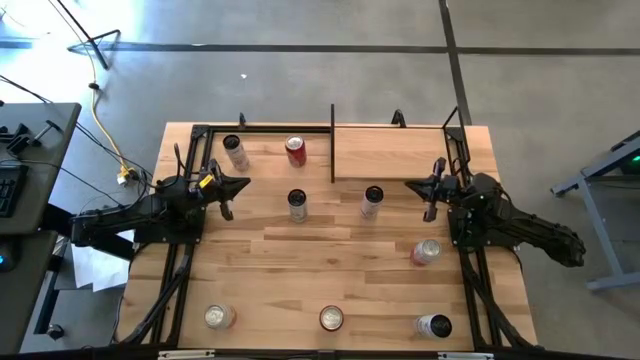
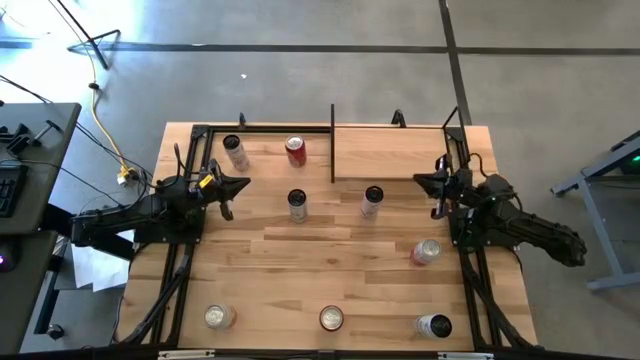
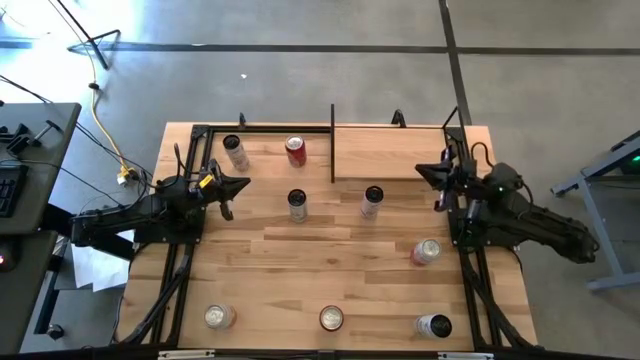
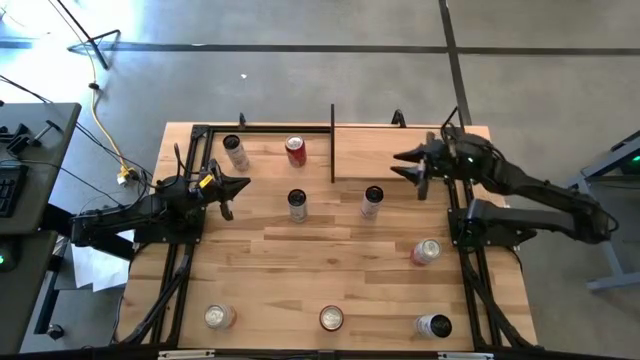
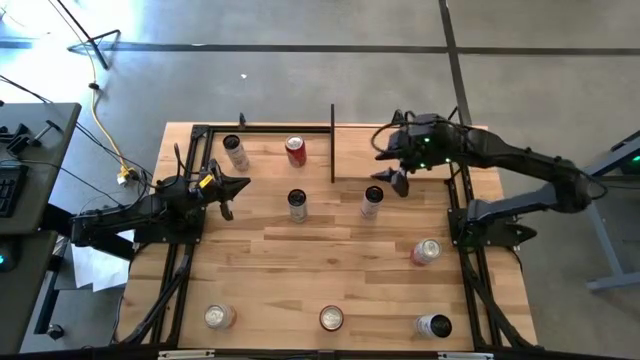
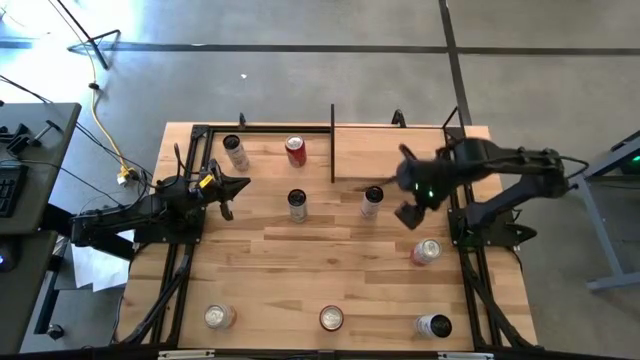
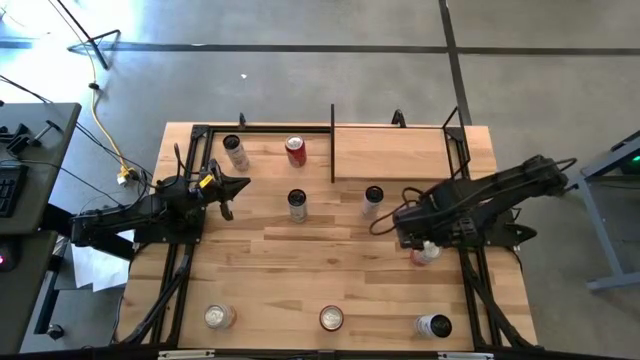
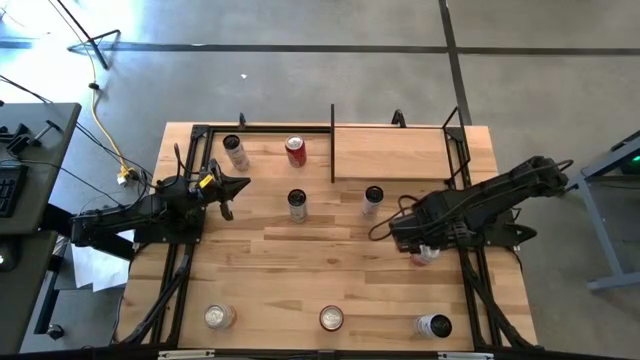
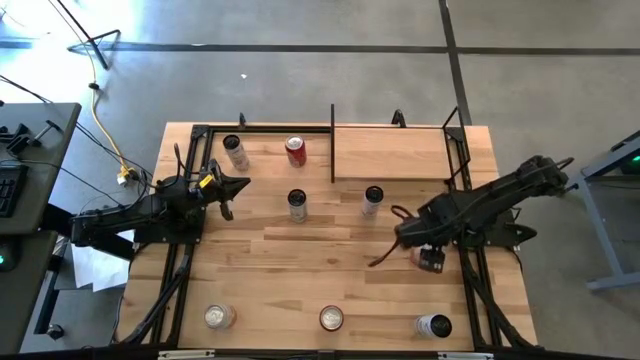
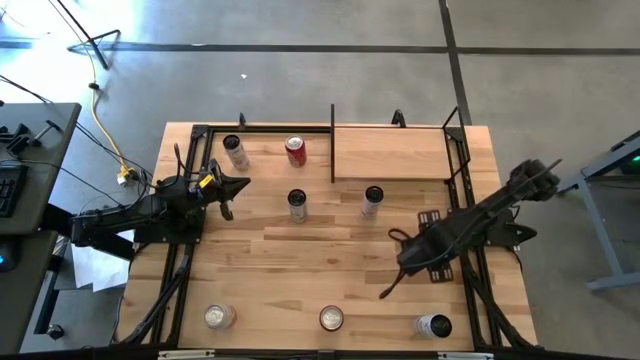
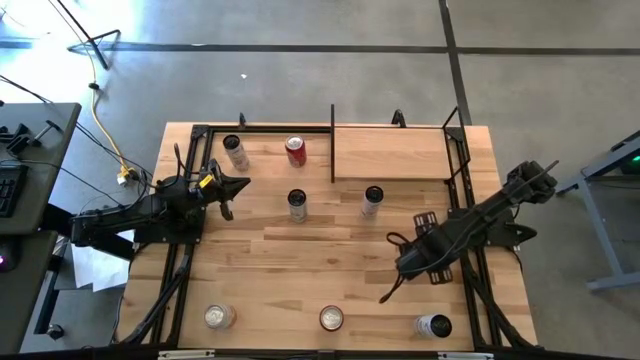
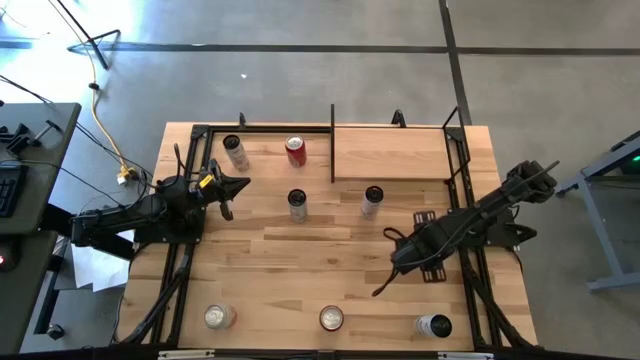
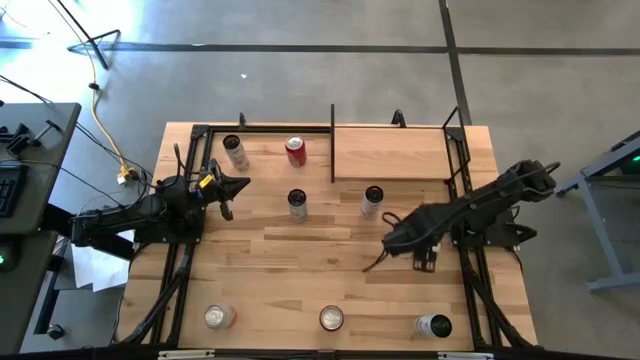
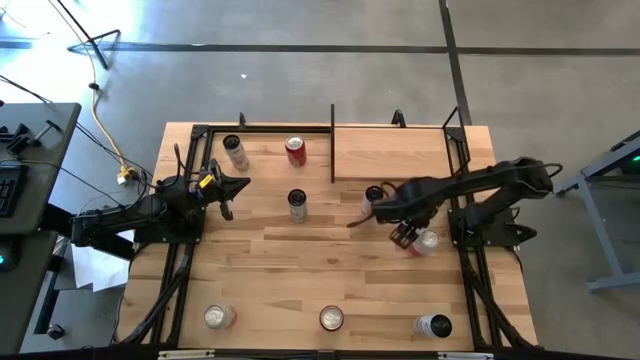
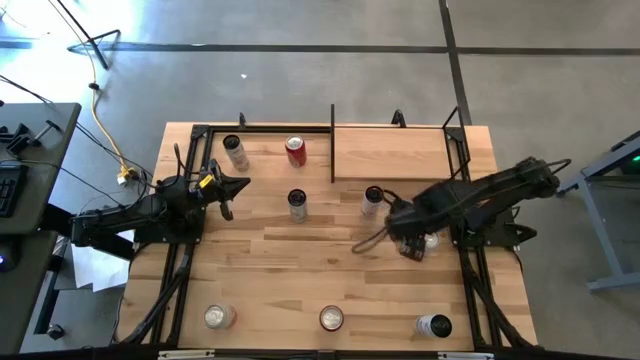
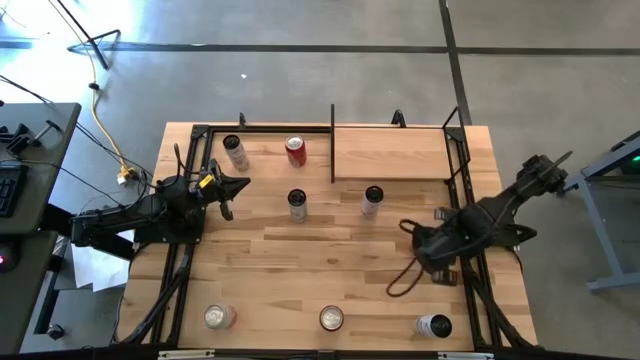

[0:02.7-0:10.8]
Task: Place canned beverage on shelf
Put the top pink soda can on the shelf

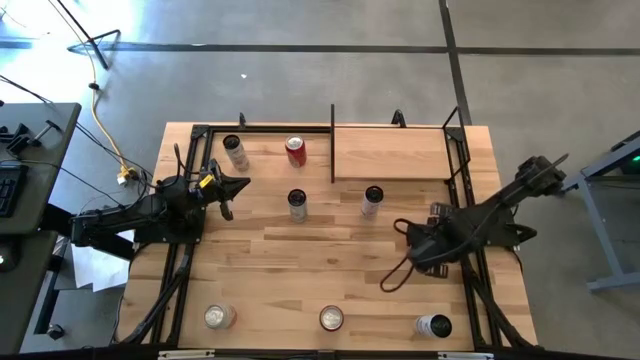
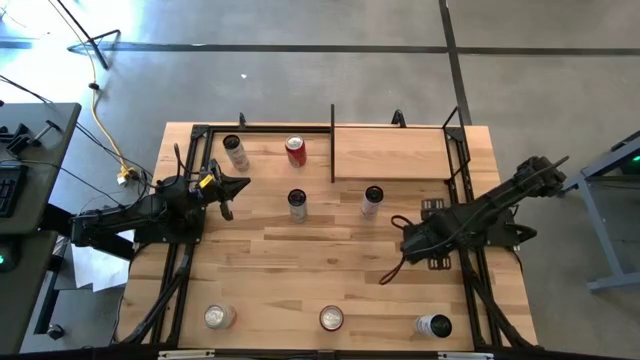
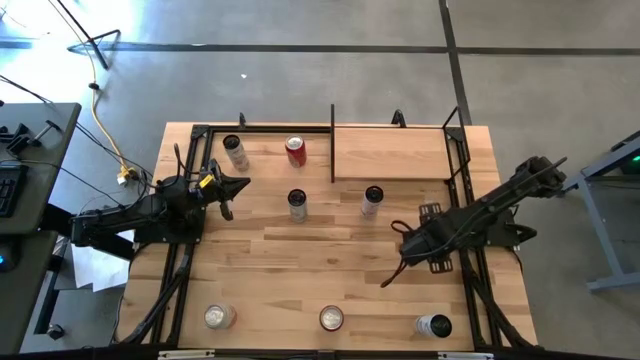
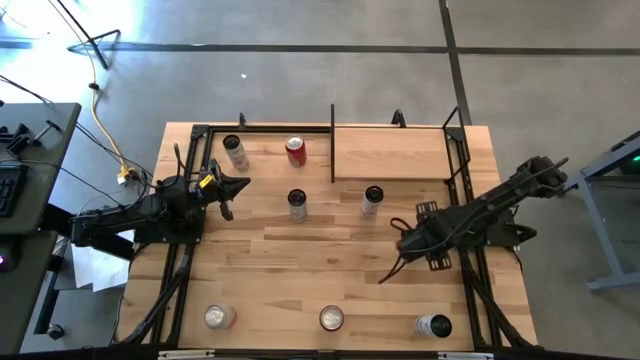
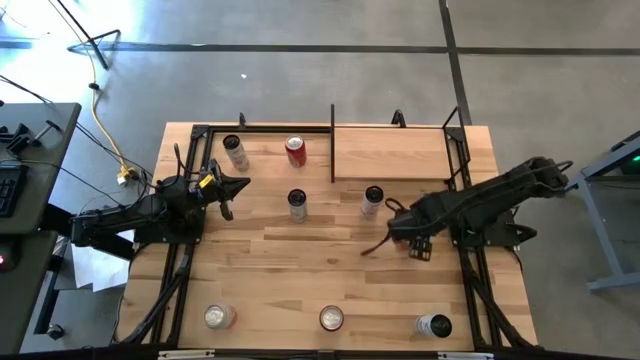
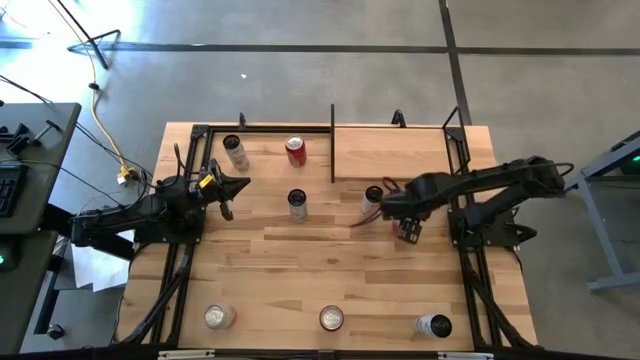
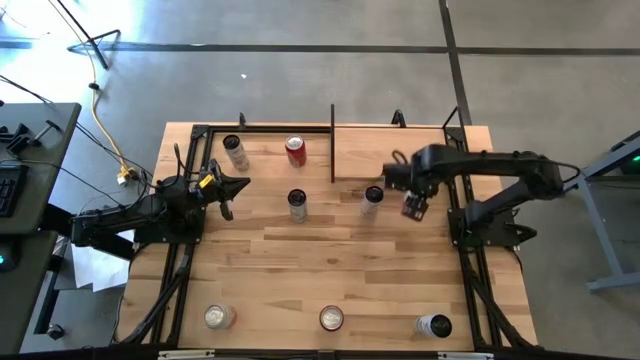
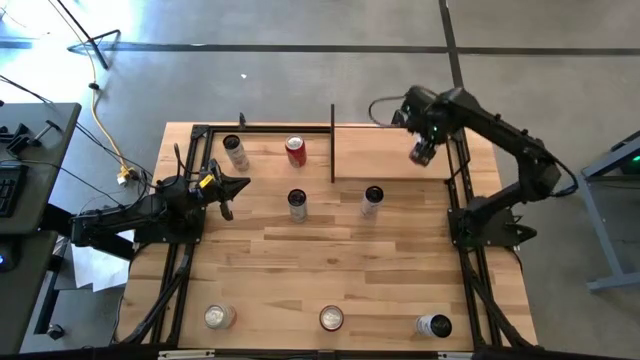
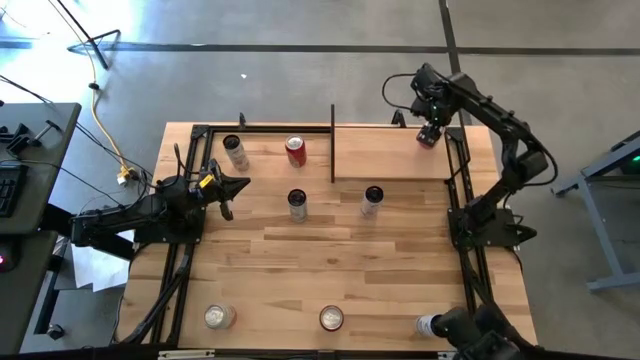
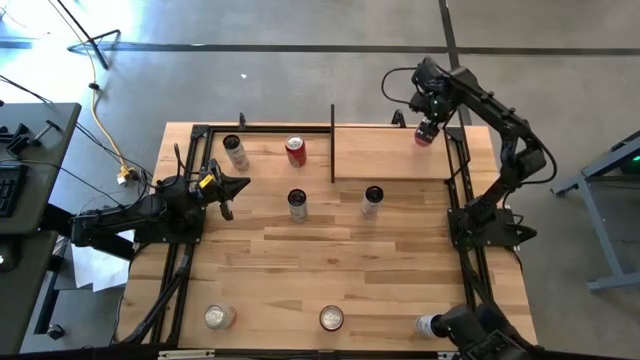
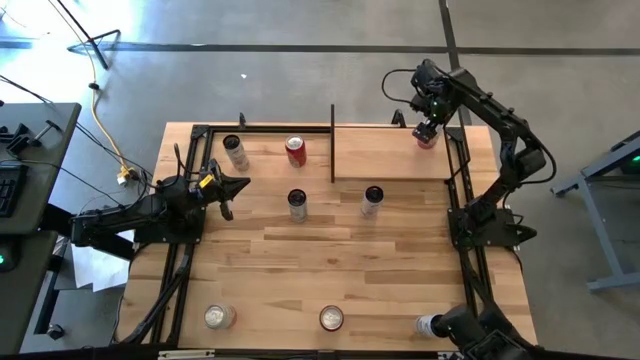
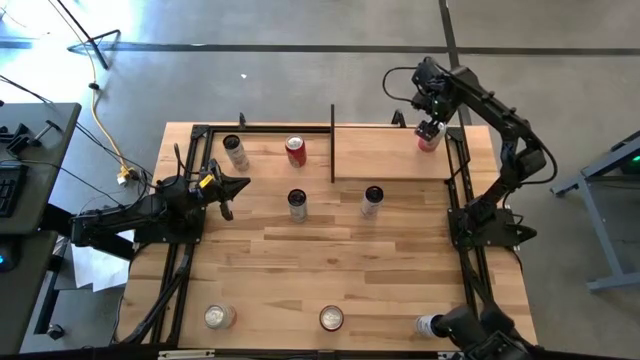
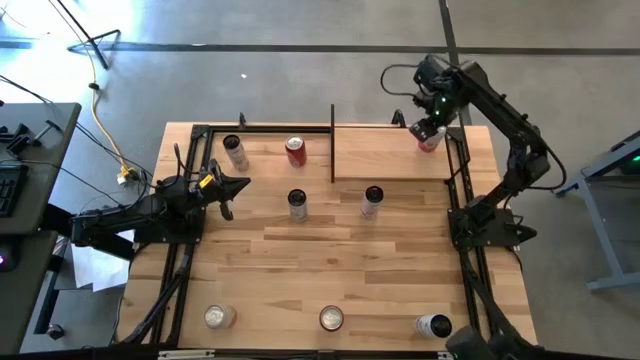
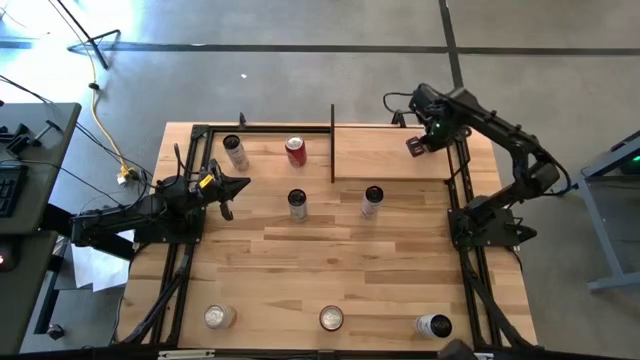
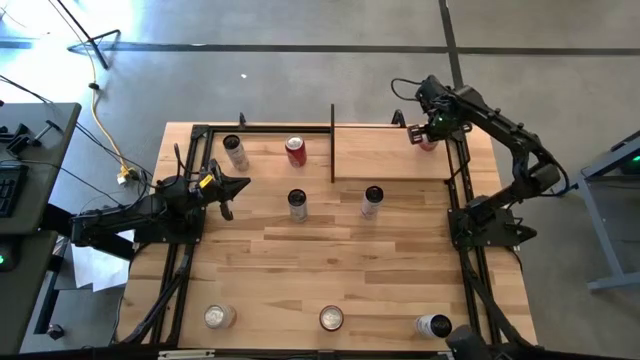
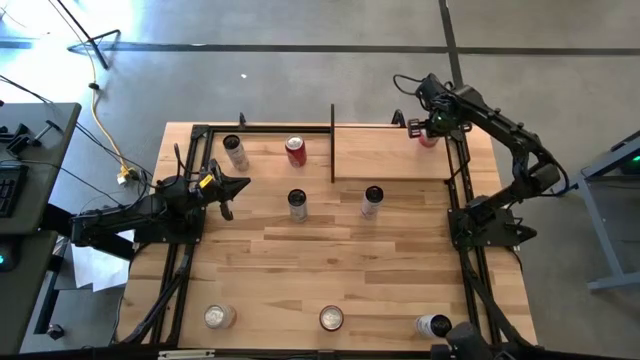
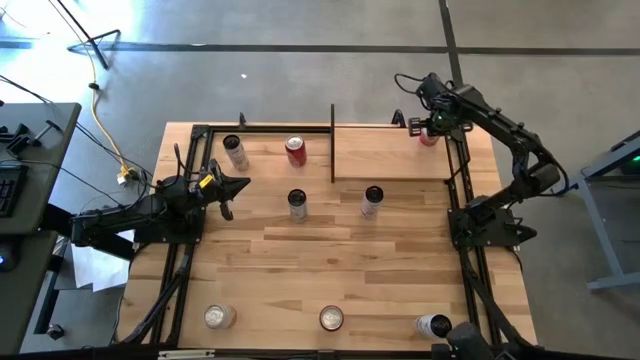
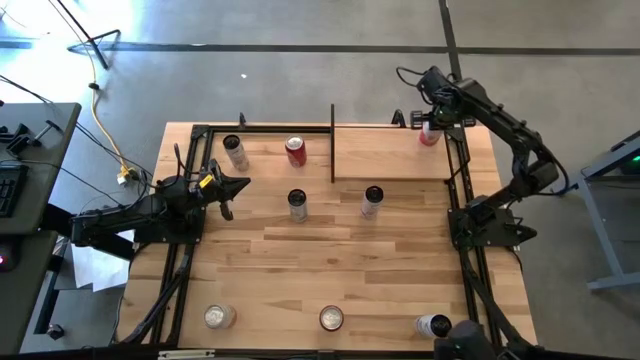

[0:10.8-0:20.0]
Put the top pink soda can on the shelf

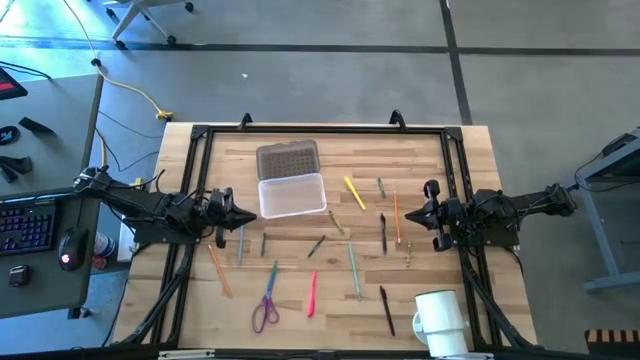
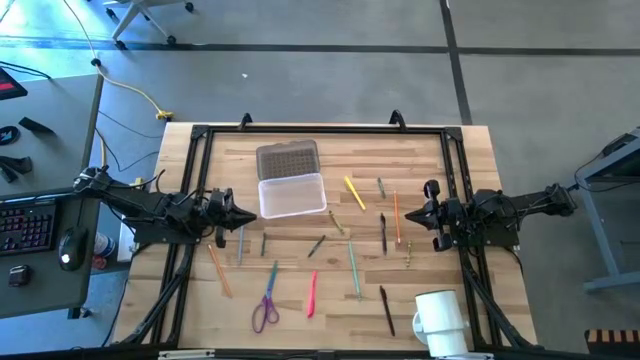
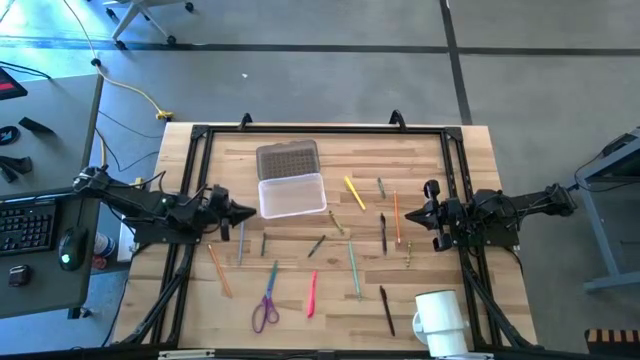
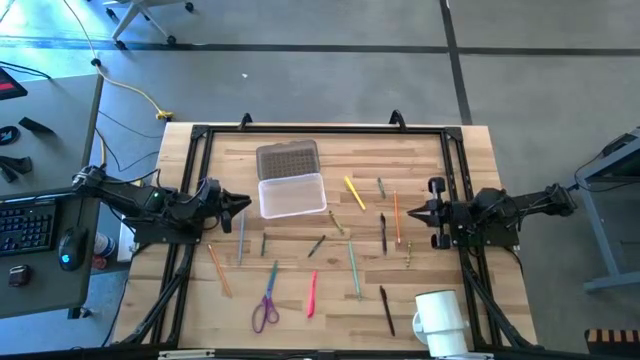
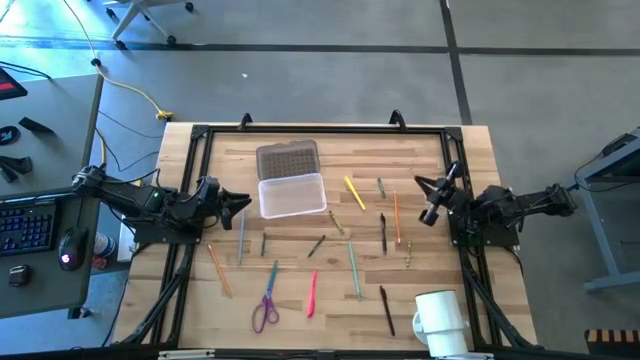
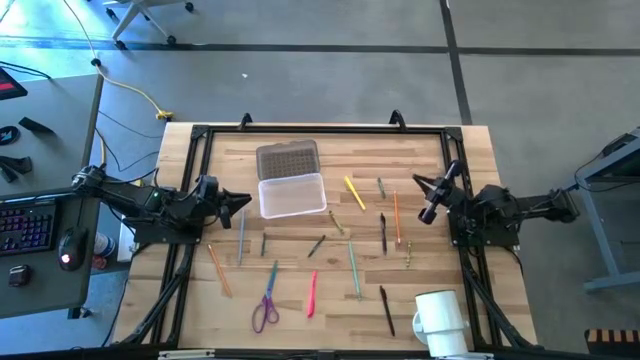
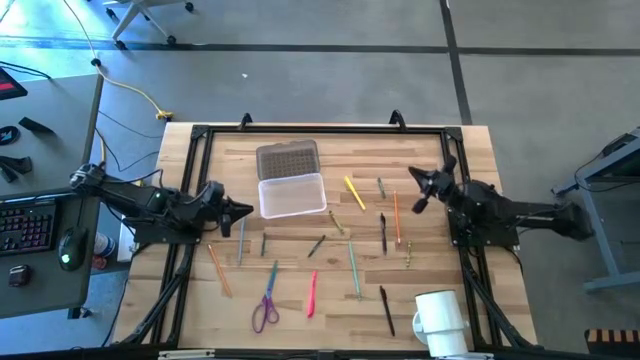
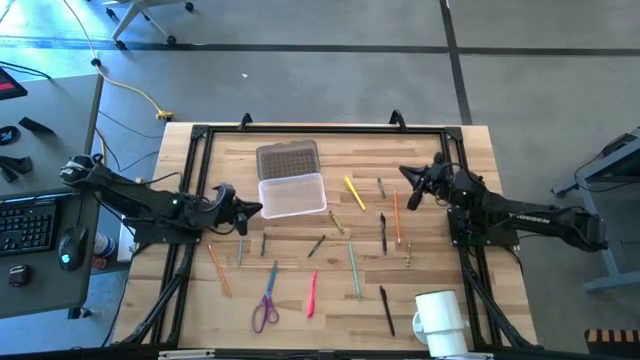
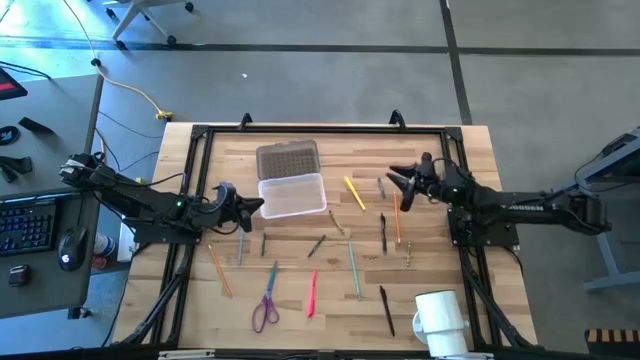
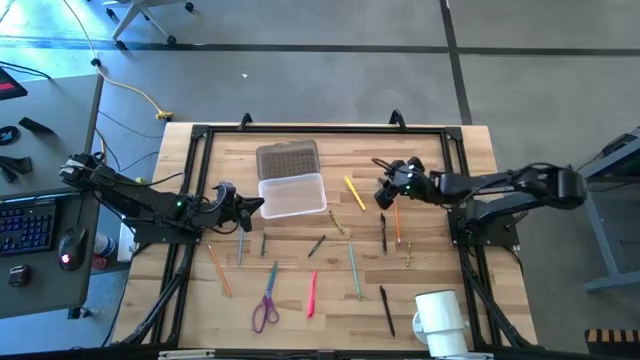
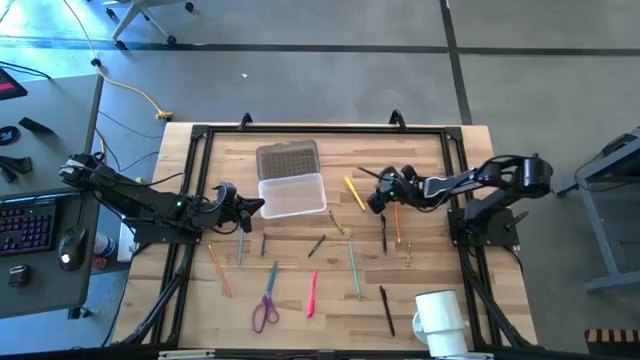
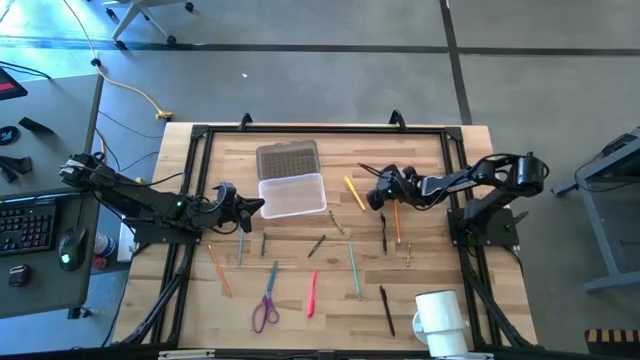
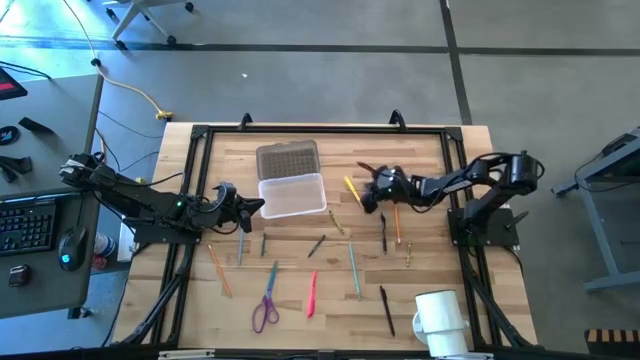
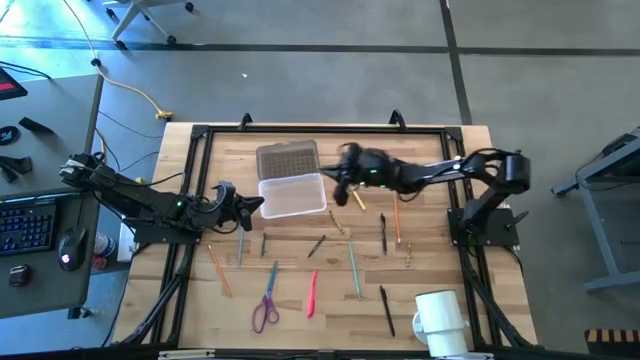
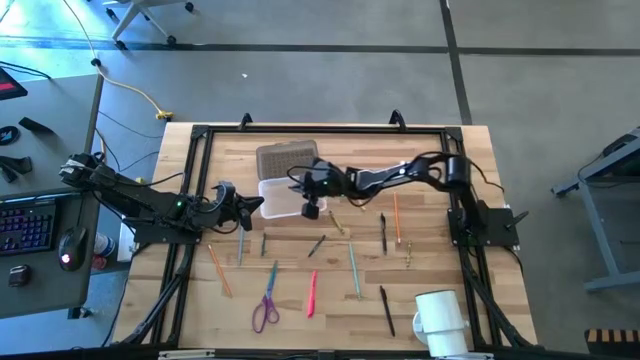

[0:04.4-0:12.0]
Task: Pick & place school supplies into a supply box
Put the right dark green crayon into the transparent supply box
